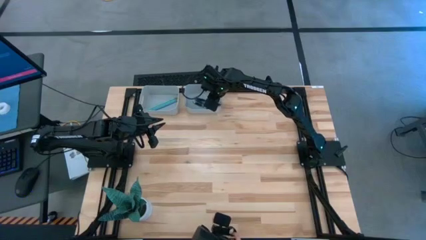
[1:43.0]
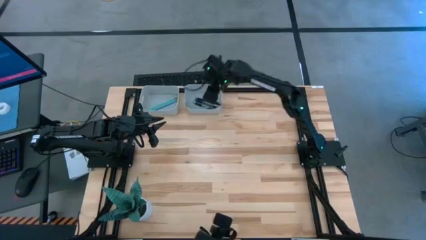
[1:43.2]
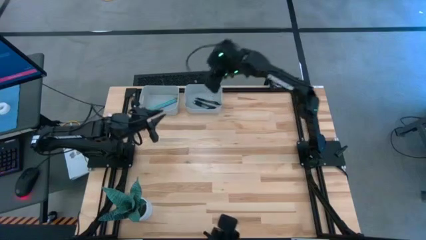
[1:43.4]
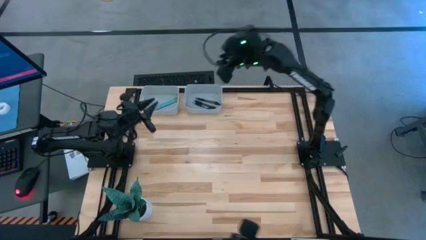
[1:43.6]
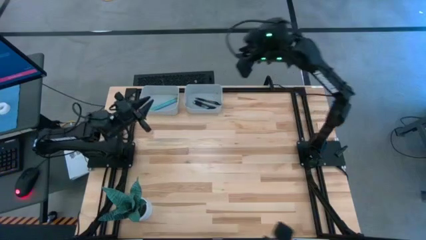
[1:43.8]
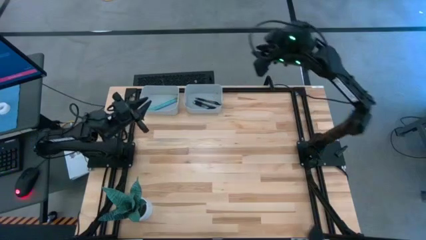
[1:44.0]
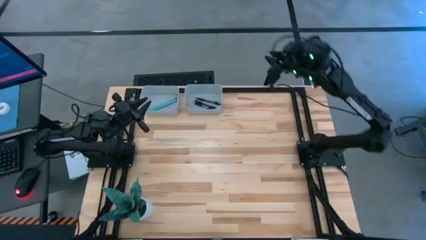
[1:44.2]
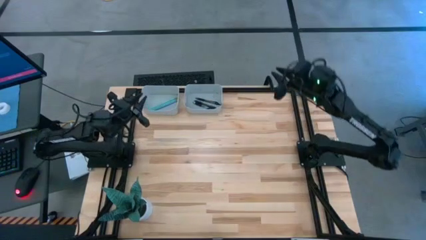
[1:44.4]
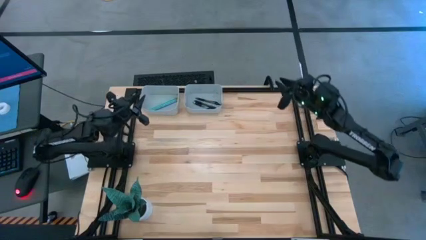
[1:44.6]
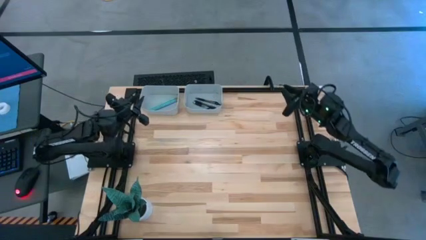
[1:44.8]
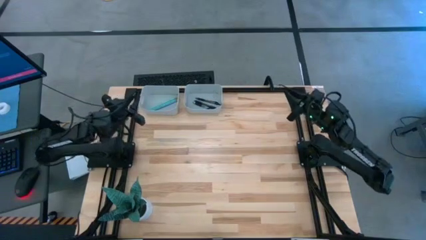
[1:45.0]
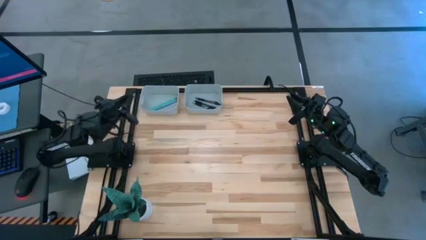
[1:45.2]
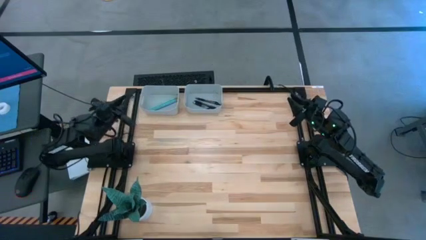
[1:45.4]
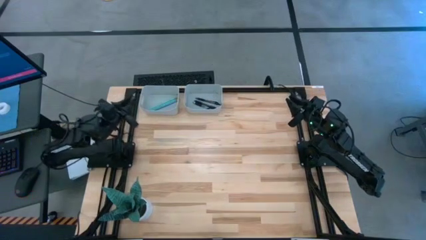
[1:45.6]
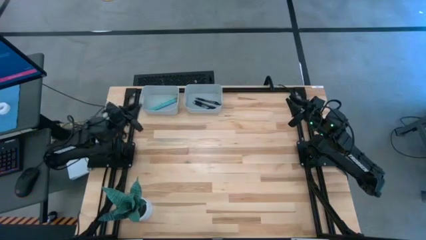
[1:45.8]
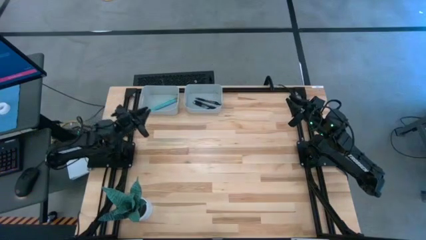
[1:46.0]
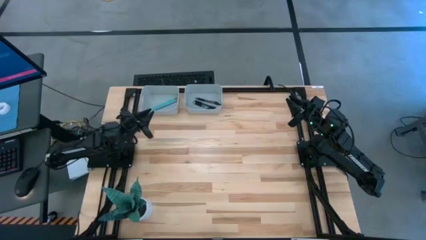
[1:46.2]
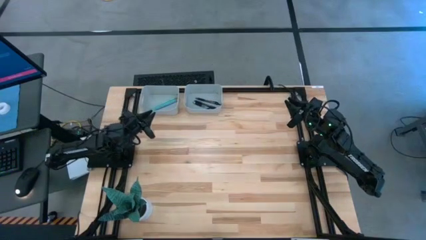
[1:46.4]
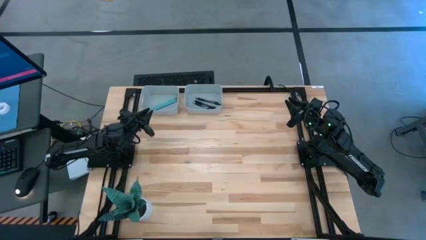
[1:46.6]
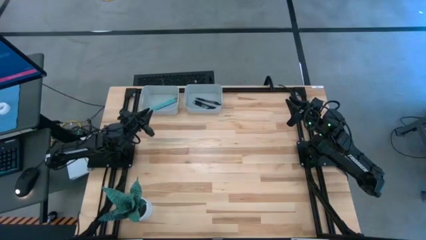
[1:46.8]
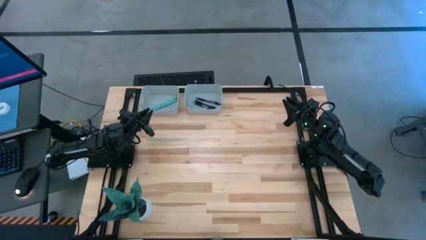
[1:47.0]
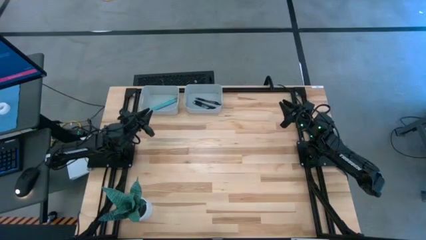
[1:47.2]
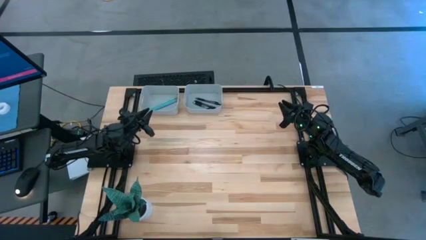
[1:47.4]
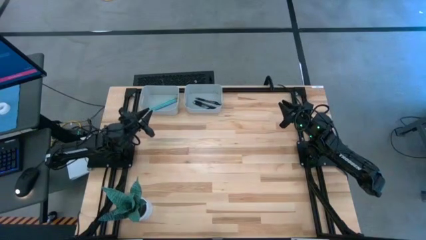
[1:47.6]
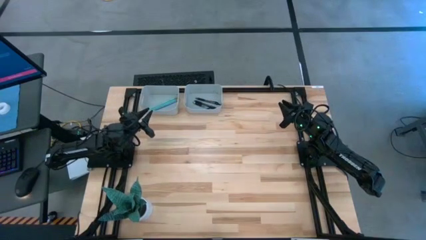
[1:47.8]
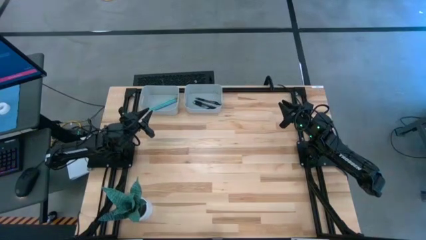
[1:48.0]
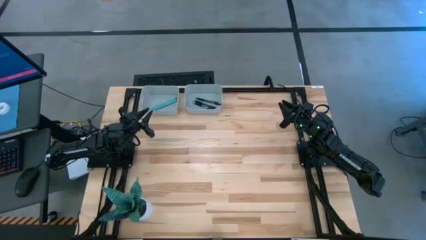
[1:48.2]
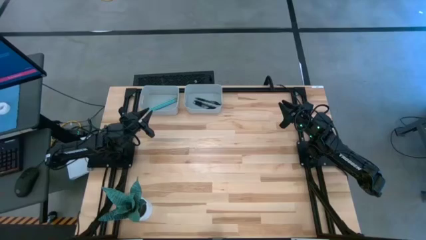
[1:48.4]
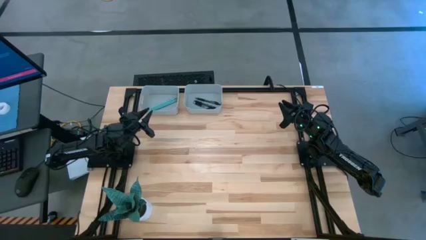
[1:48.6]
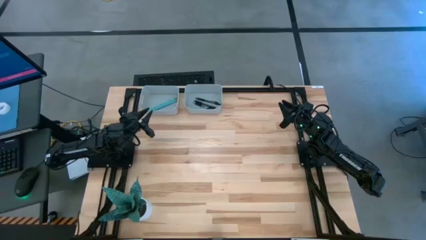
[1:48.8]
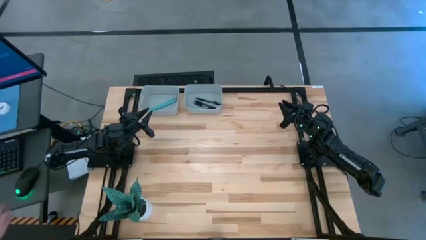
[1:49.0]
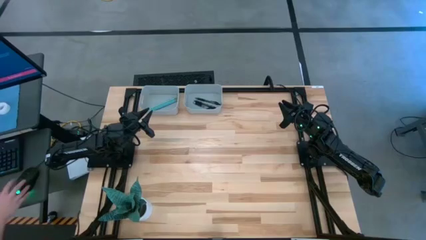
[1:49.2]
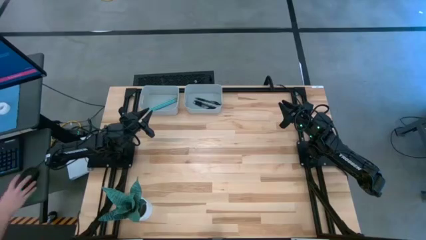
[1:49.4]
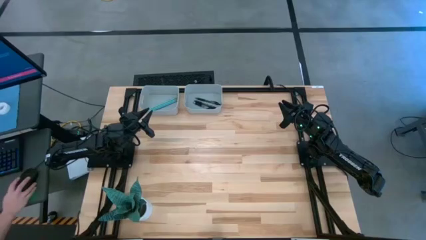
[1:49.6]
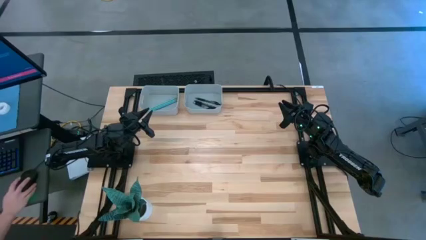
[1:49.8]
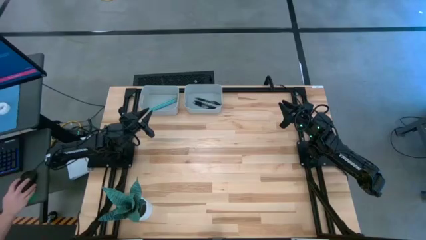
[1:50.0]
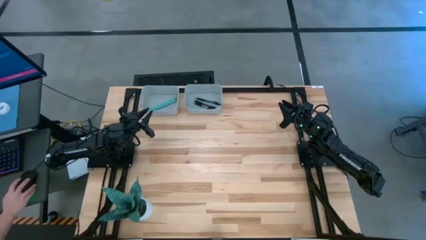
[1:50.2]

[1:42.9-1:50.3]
Task: Sort pens & pencils
Return to Home Position

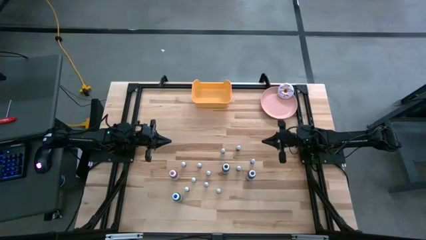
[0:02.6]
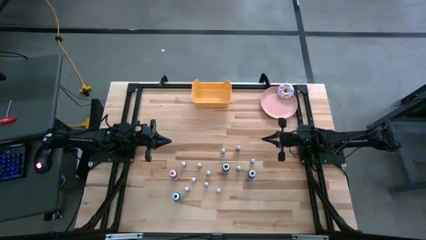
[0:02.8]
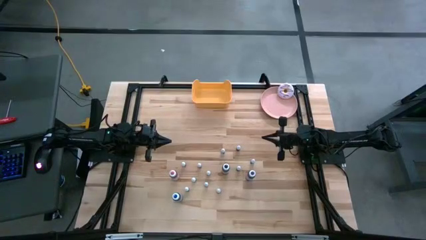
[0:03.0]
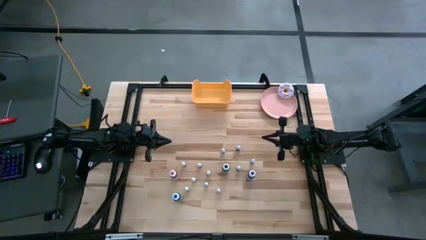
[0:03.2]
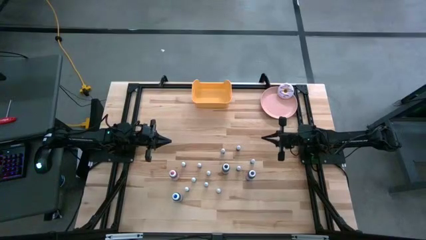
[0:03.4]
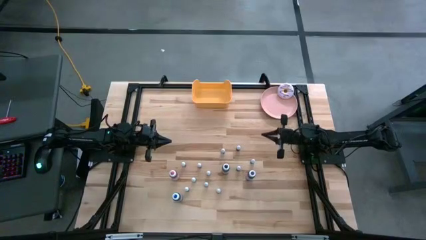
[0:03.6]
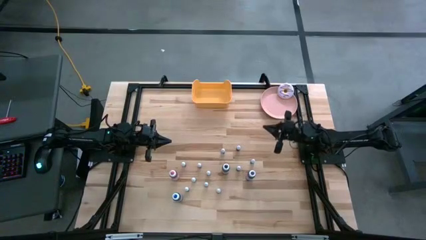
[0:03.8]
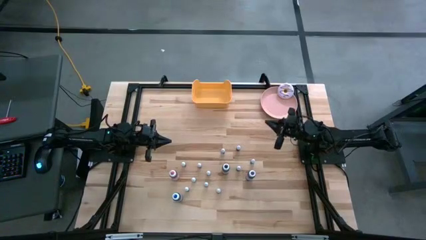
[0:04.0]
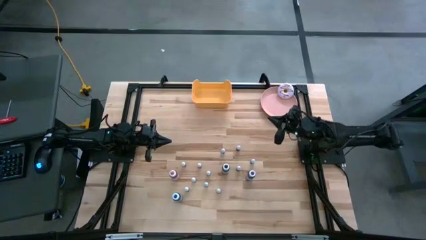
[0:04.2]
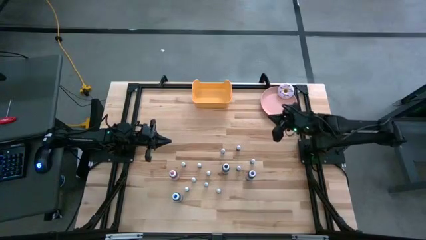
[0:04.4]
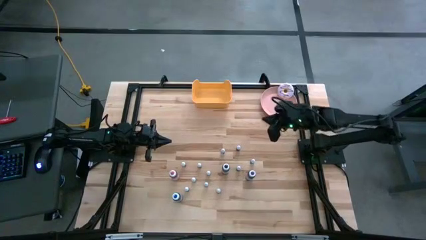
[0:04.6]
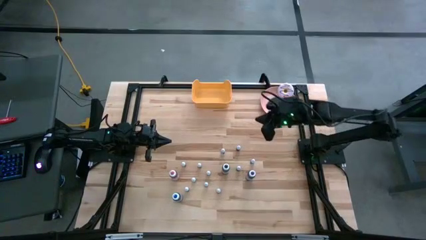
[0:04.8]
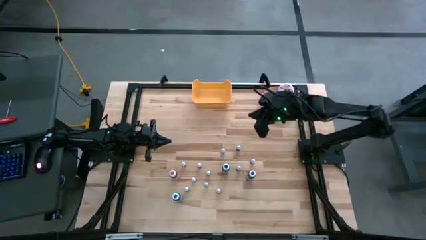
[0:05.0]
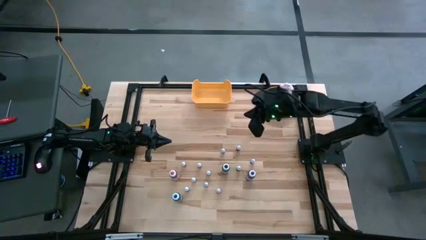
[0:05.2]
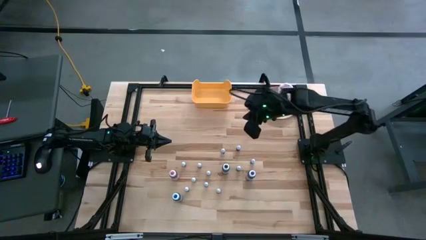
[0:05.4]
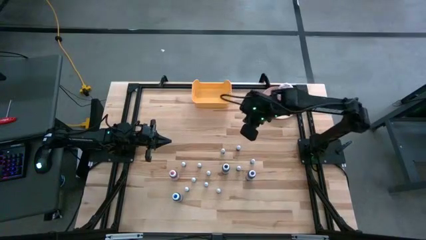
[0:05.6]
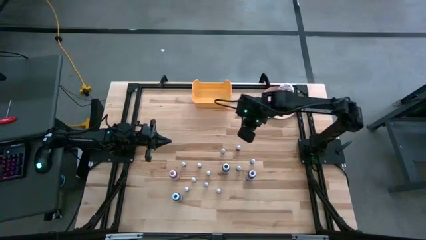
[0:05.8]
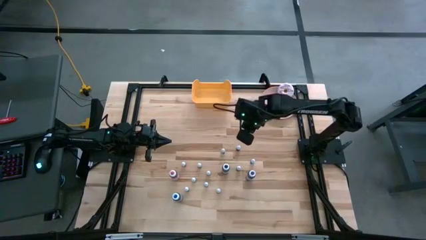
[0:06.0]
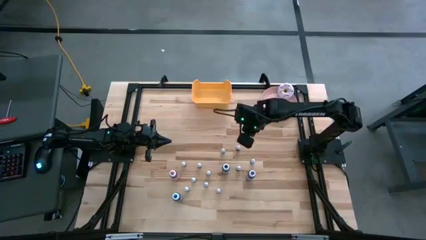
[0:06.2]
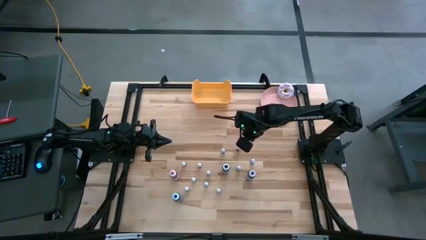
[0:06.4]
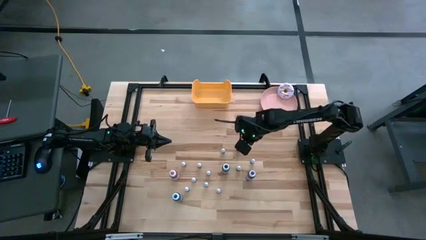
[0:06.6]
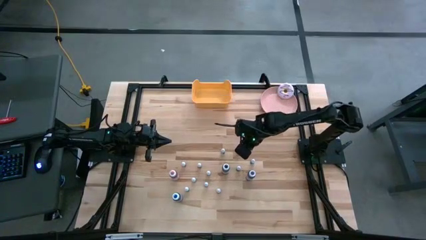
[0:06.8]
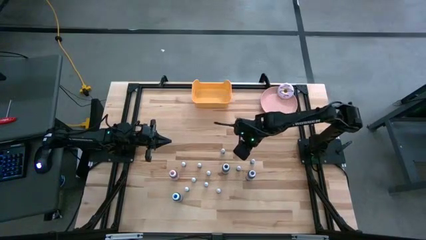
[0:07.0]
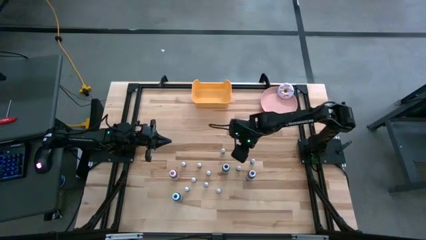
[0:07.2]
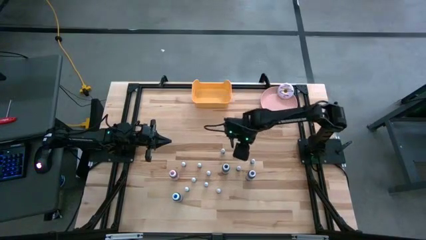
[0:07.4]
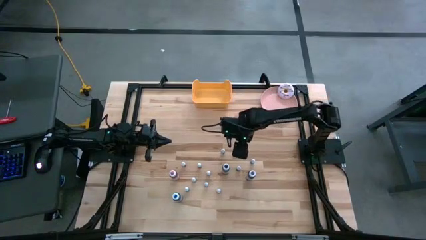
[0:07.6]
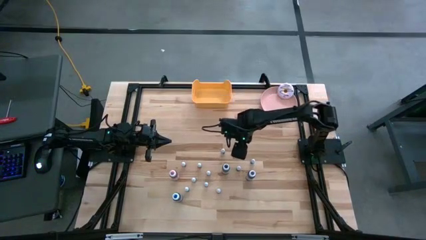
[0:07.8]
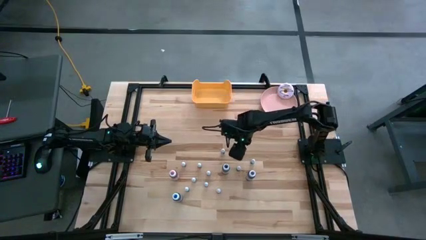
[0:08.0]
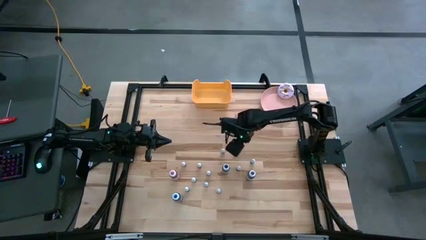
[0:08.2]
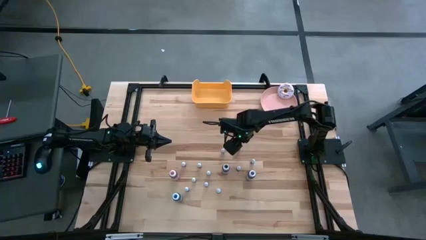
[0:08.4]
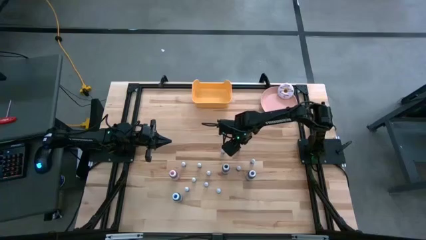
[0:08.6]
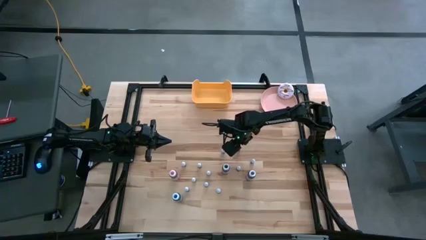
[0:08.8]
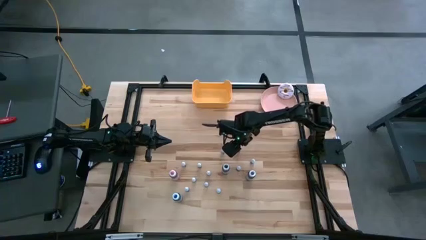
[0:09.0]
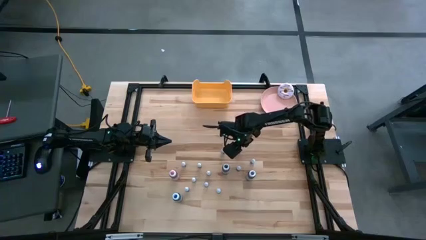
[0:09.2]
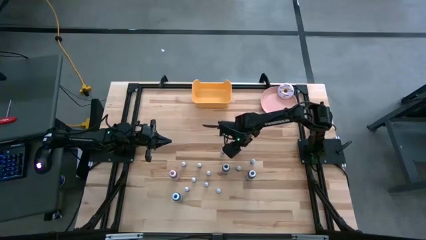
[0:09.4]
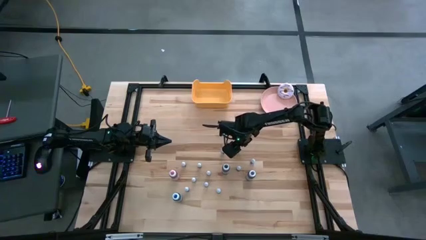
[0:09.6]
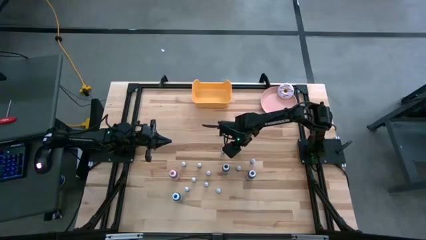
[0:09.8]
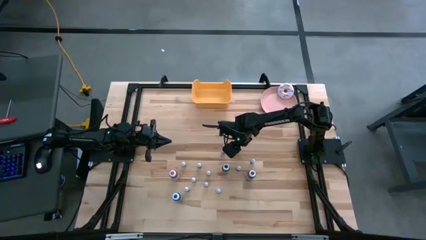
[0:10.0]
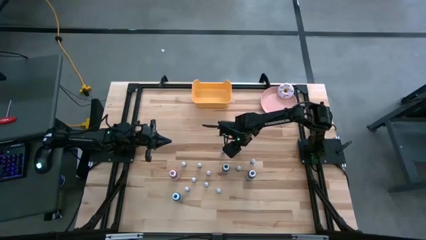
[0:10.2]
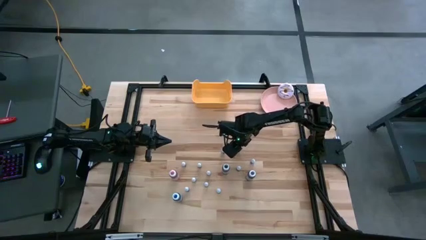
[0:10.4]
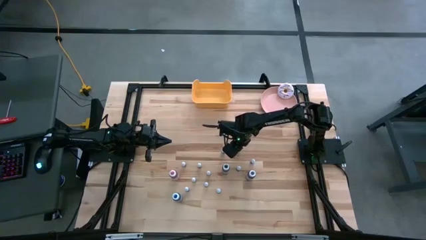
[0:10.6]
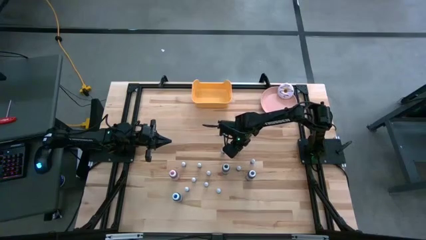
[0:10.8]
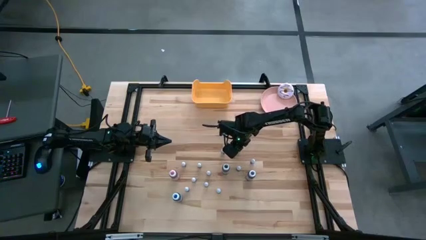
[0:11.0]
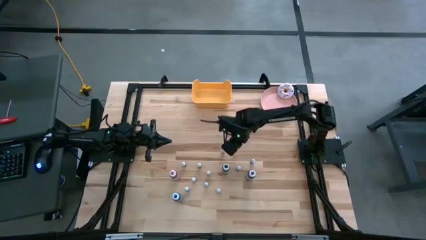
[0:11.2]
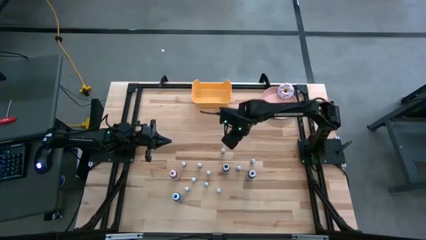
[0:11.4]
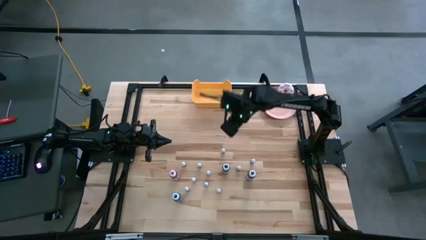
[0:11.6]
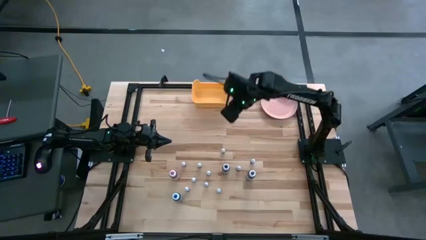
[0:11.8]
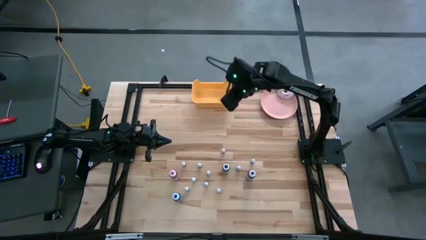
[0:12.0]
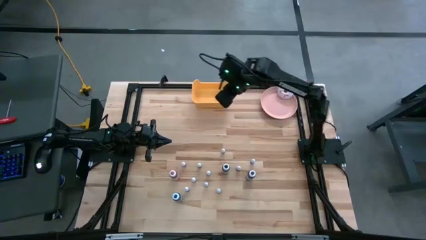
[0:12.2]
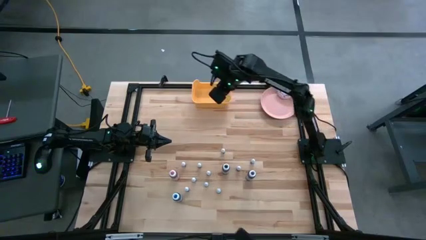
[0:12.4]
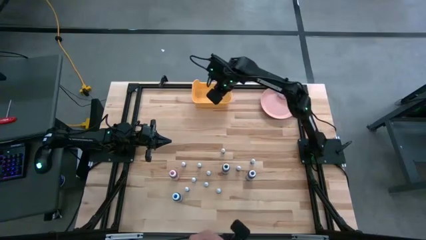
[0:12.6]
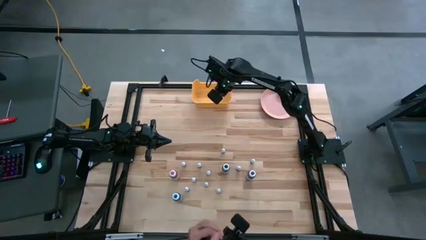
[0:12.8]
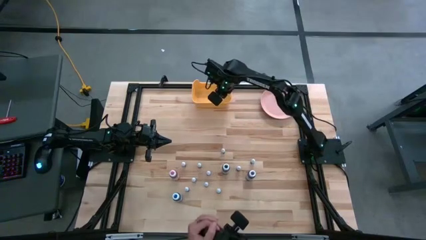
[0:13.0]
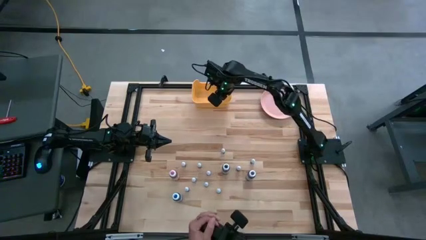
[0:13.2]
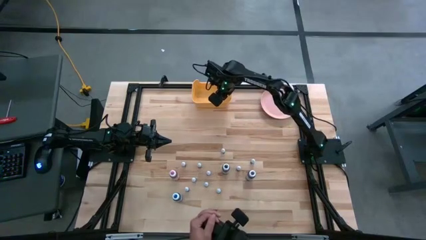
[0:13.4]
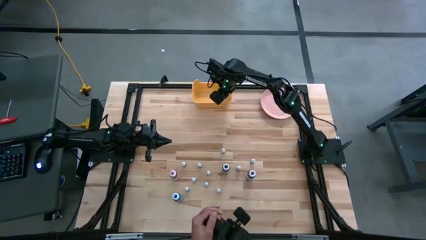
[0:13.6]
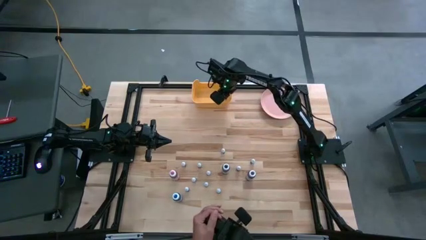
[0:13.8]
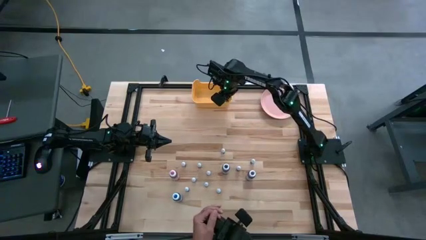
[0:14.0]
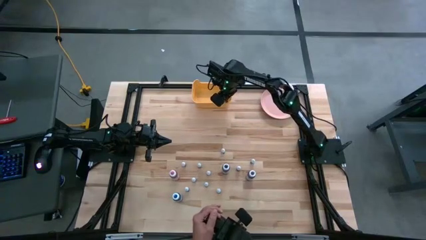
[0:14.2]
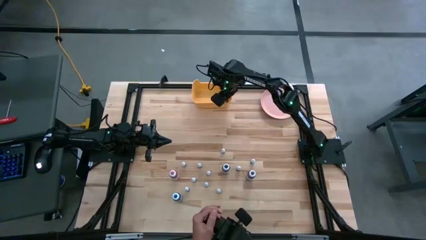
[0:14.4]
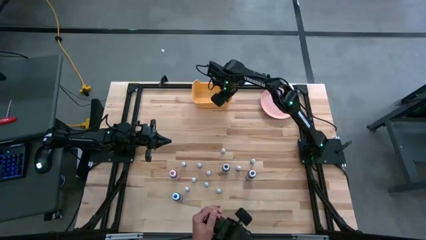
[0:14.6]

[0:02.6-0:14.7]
Task: Pick & Place food coloring
Put the small violet food coloring bottle into the yellow bin
